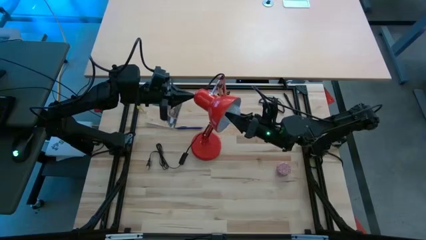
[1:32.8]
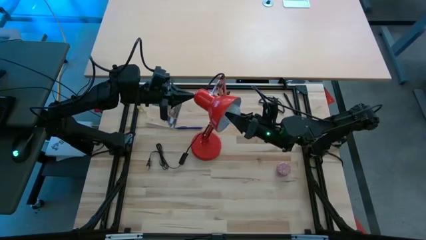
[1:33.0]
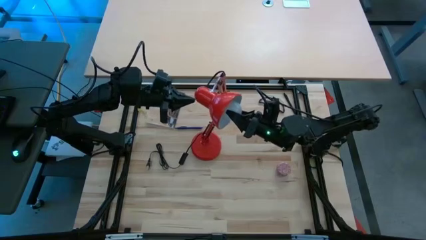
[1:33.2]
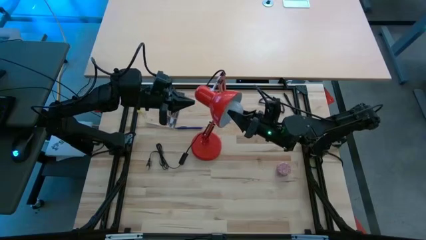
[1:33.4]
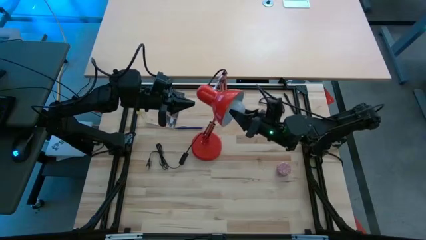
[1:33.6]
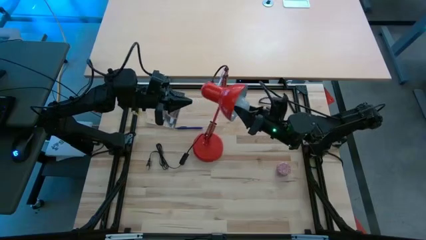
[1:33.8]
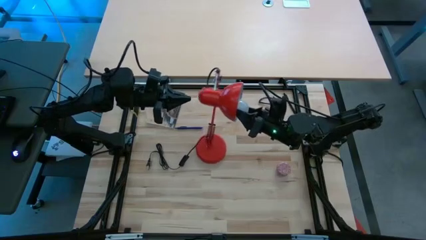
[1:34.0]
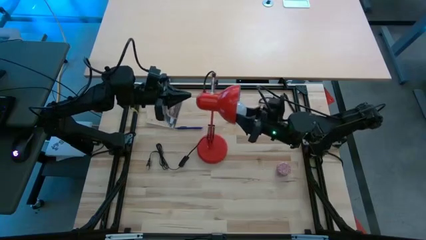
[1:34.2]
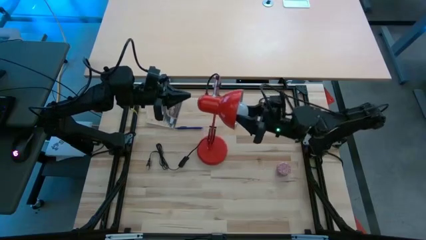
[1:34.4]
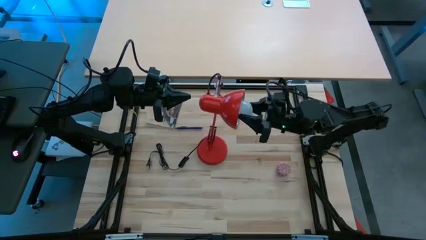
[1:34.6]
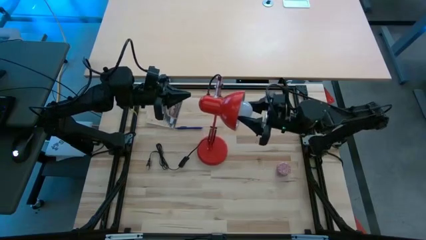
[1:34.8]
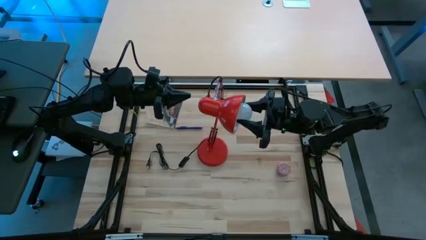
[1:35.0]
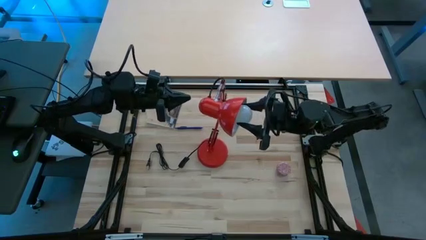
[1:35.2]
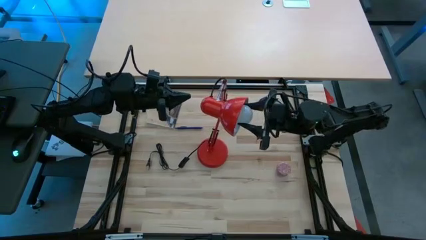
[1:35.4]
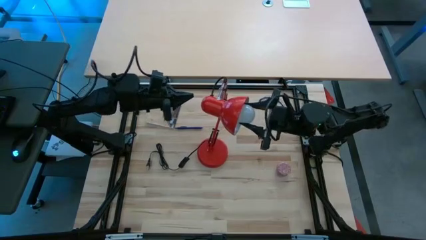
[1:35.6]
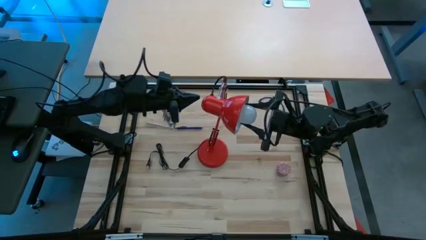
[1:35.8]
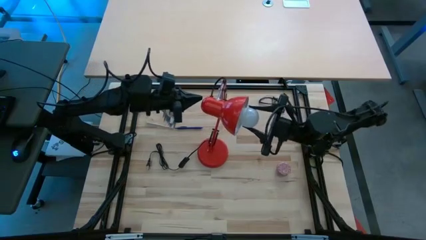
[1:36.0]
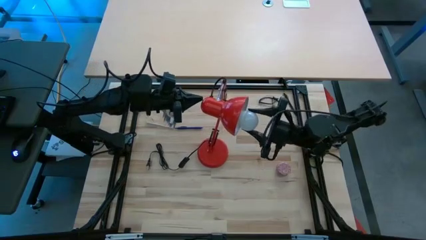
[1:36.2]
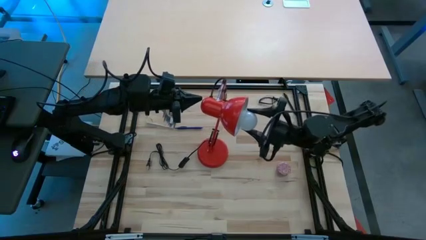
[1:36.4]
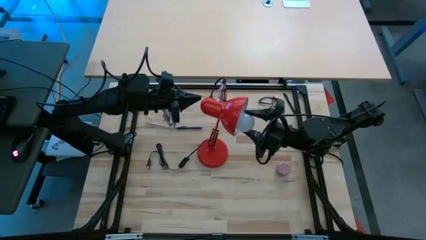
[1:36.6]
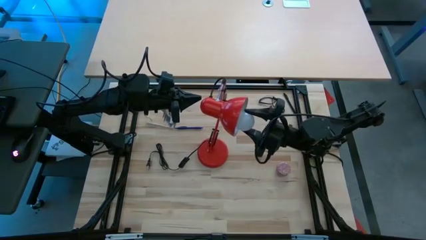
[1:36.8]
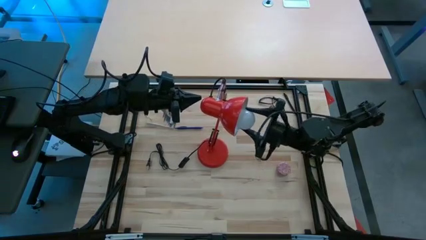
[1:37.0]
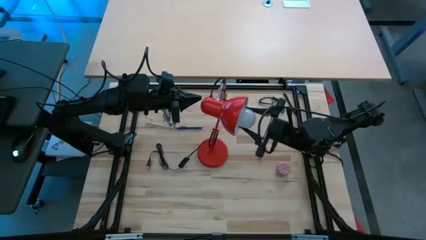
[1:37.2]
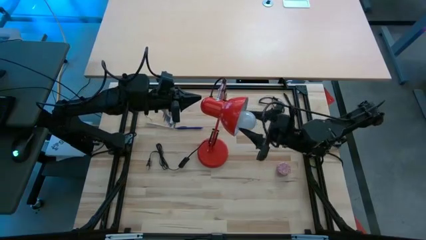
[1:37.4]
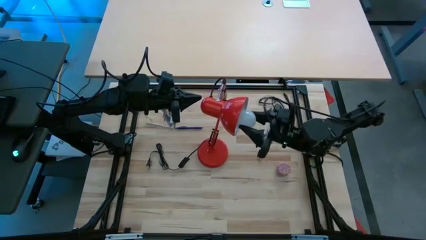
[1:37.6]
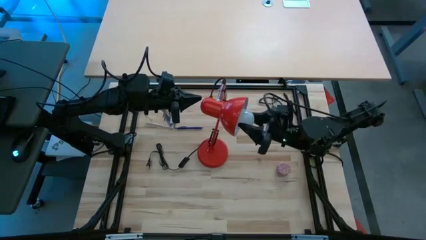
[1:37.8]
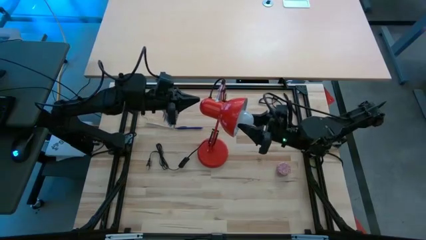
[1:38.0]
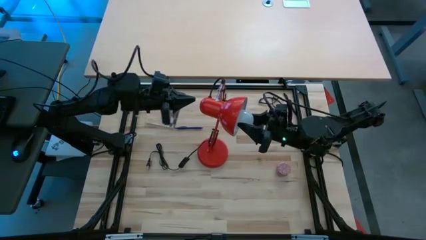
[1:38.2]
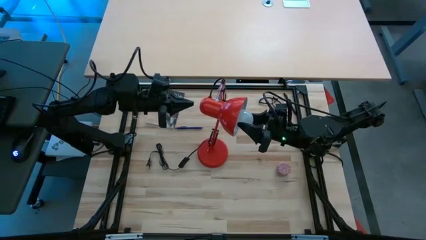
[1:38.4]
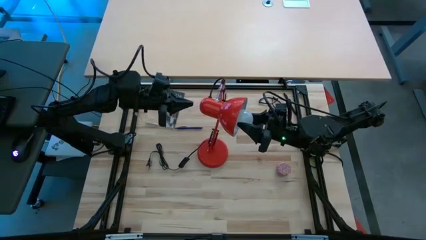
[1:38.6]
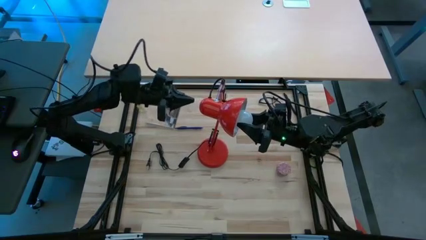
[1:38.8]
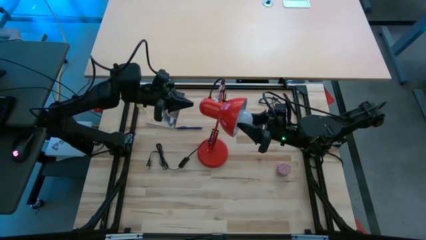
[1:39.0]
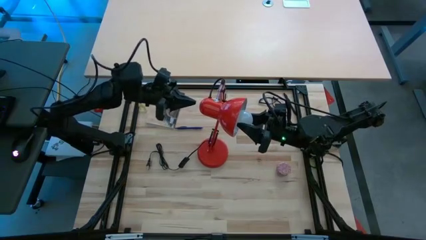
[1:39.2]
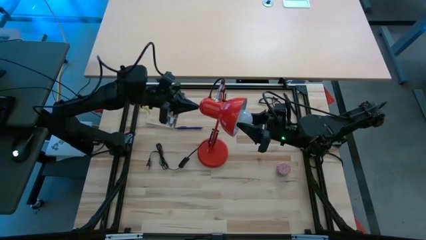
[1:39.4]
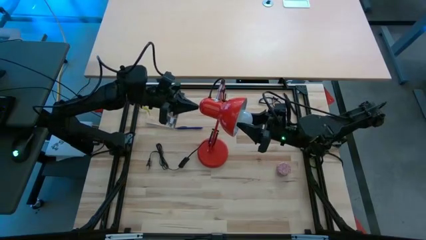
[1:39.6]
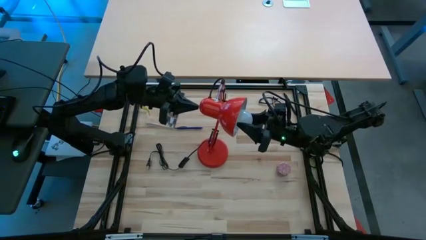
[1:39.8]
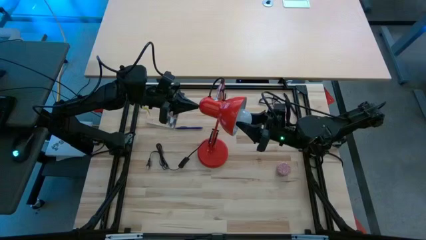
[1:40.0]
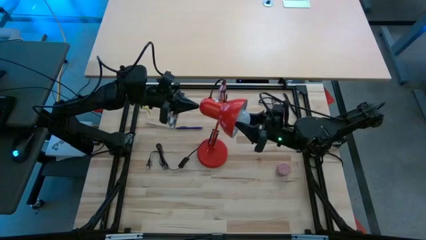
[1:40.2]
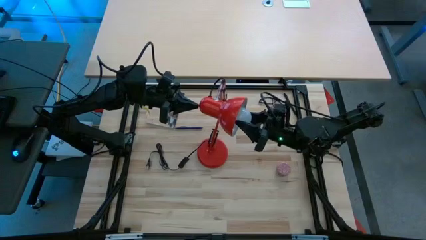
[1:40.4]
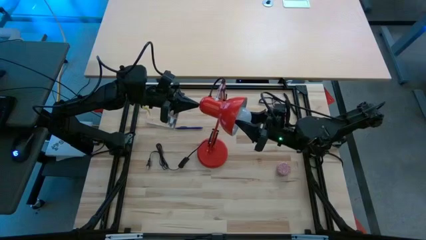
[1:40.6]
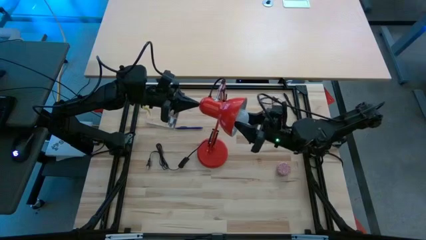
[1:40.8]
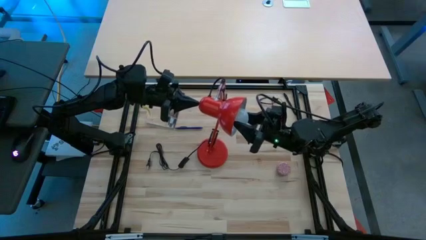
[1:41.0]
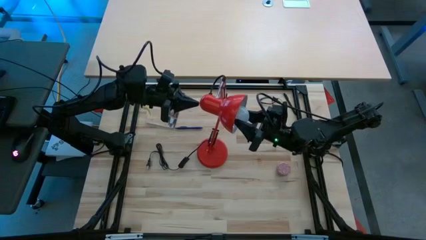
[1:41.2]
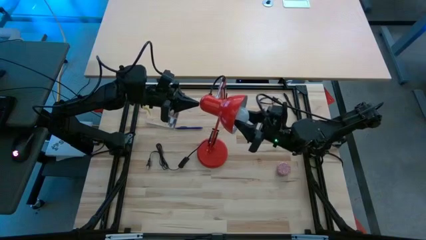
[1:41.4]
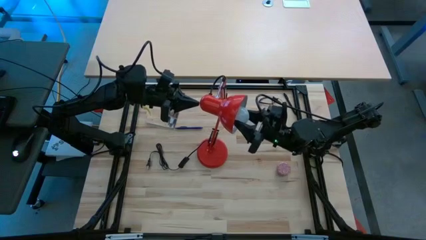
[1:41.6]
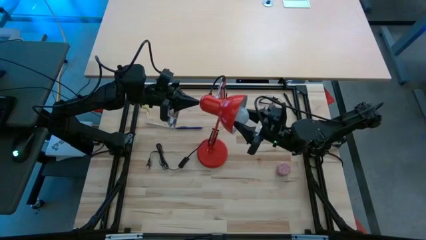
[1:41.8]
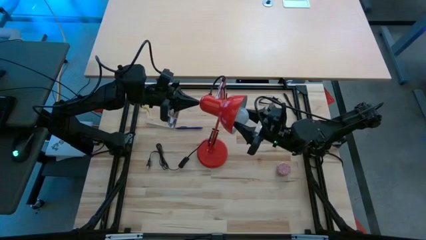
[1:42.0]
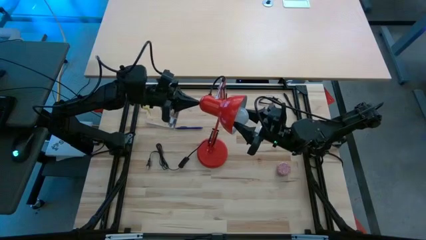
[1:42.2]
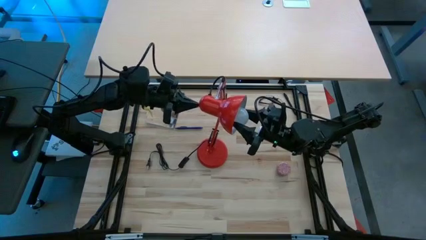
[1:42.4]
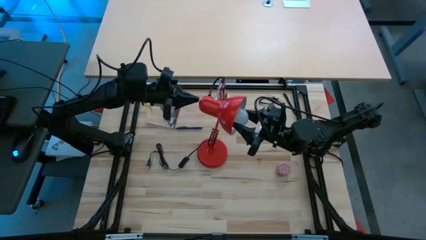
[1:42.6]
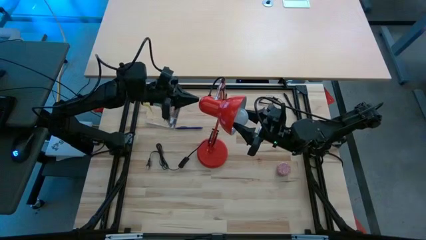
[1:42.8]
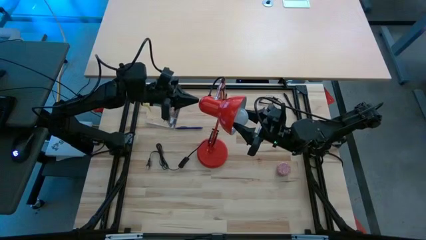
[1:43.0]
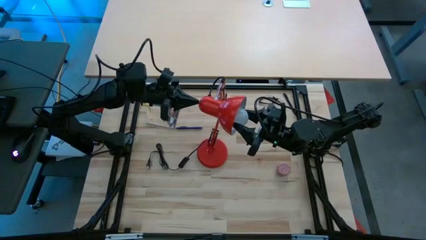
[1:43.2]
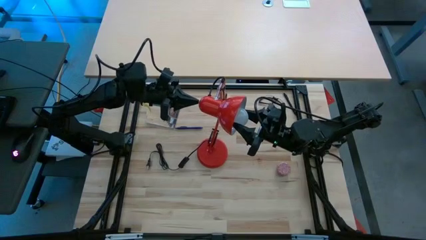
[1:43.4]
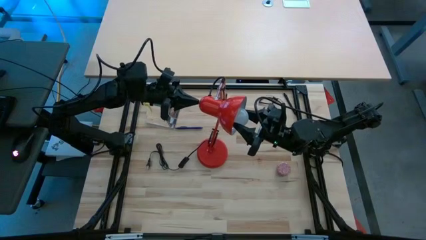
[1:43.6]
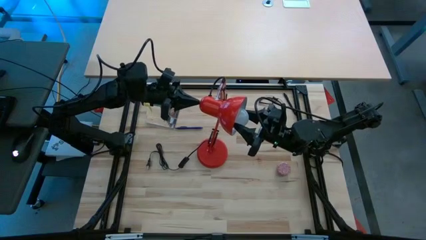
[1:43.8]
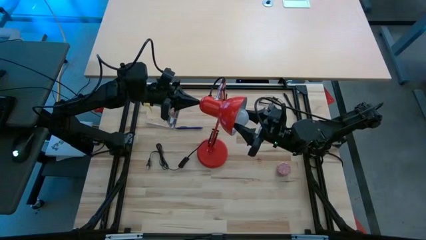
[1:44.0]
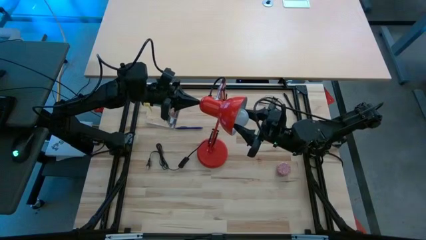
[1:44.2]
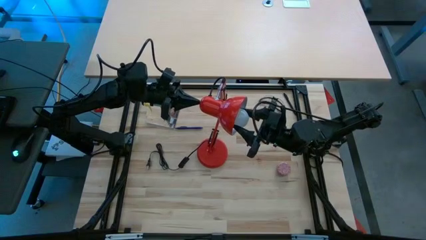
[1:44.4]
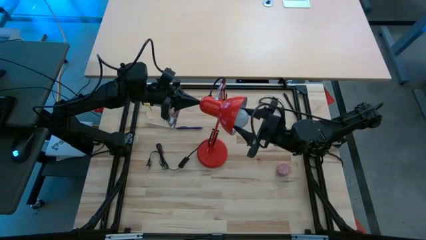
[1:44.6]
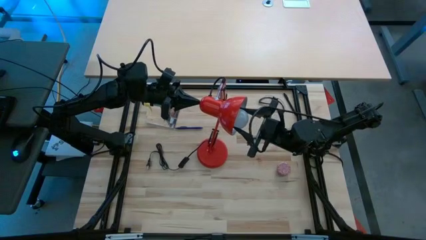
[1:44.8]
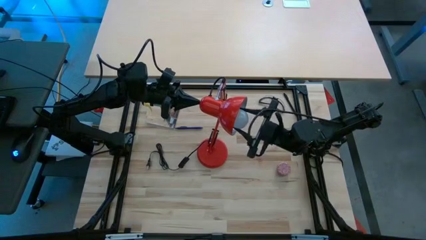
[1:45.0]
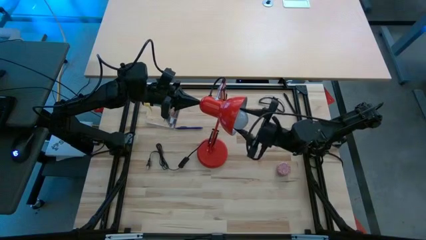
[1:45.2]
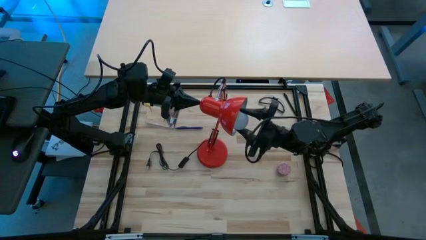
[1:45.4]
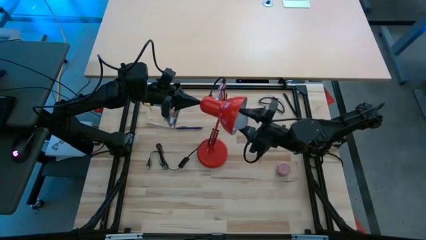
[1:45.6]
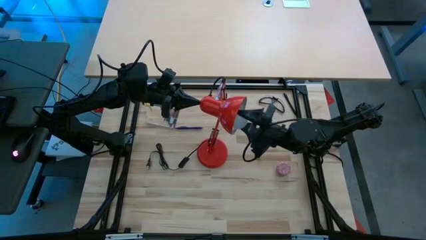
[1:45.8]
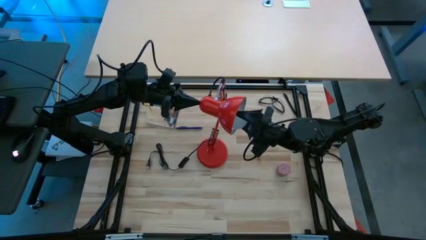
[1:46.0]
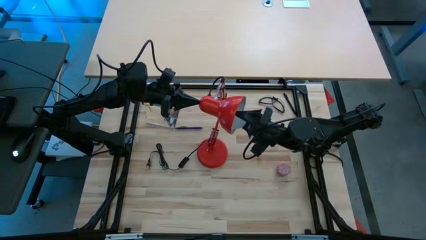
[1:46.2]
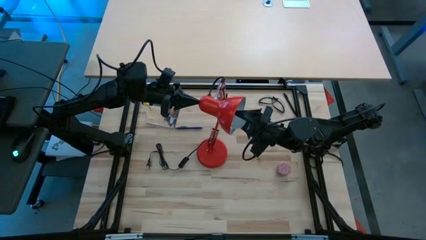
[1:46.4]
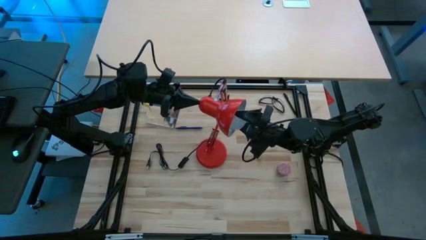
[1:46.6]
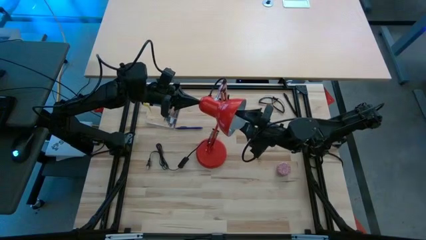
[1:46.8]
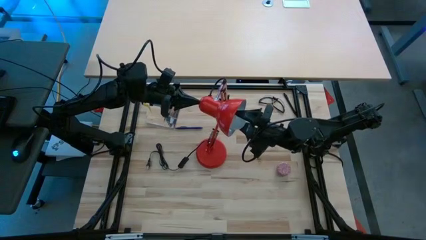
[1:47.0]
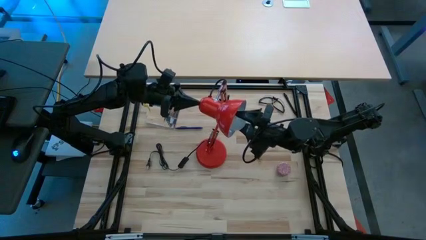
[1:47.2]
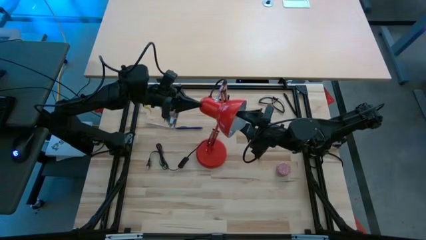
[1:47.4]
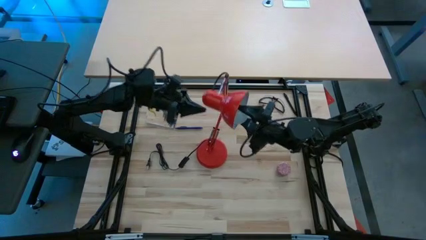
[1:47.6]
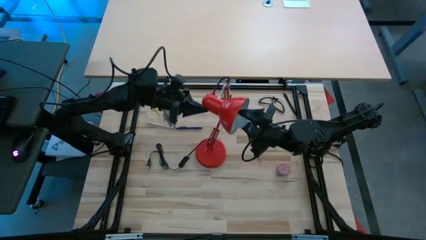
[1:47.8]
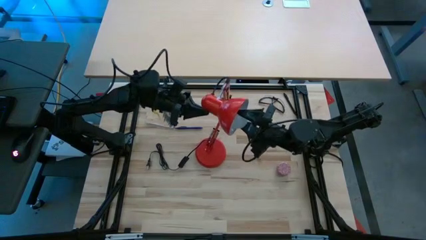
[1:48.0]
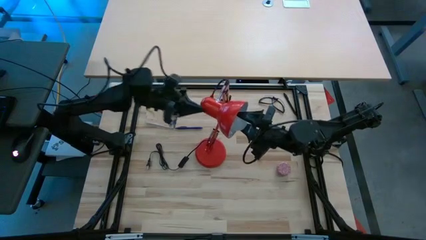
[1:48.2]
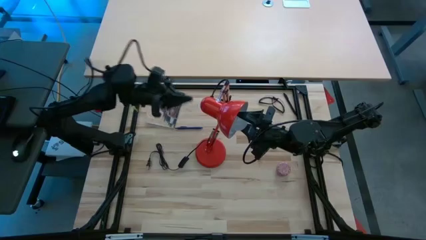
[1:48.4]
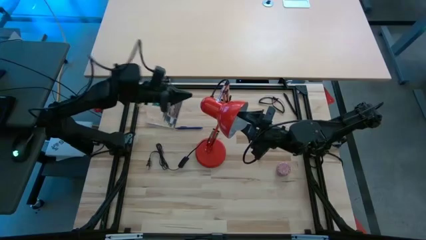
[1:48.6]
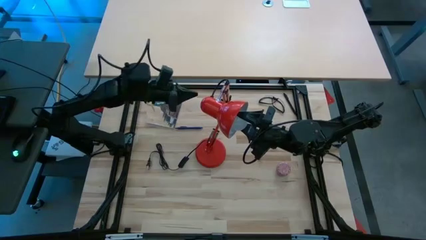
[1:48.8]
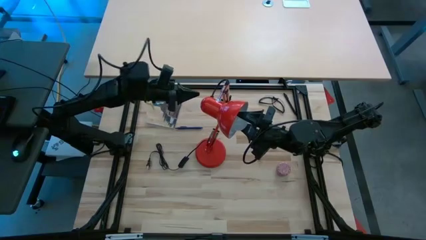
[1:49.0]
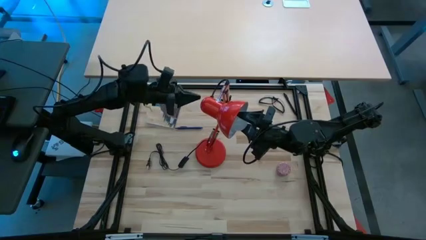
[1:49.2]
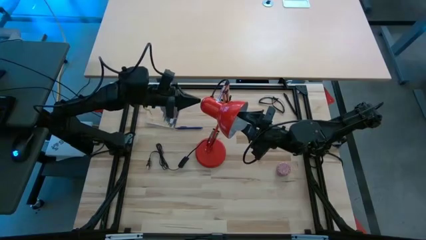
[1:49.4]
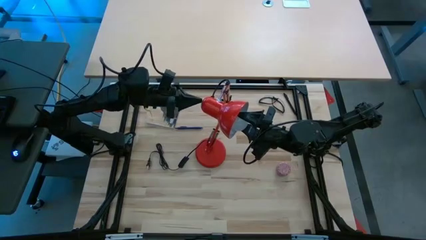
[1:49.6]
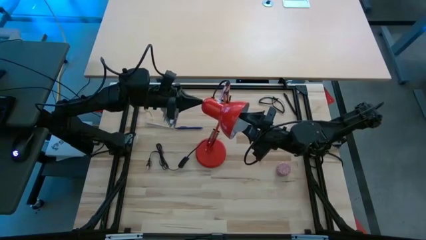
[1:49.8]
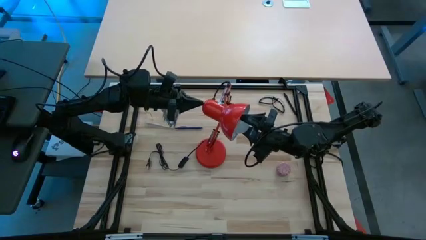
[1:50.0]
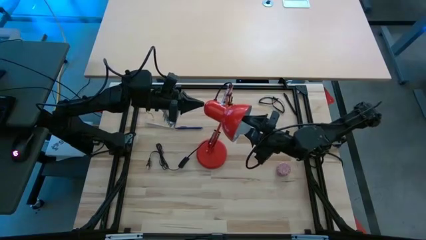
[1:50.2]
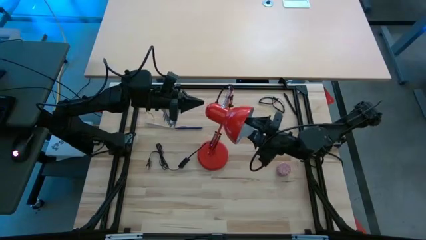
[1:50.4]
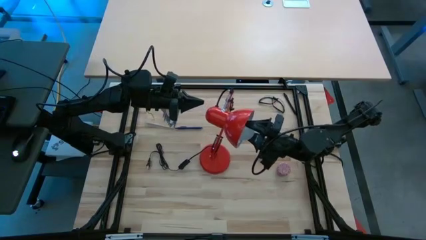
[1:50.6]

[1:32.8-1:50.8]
Task: Screw lightbulb
Insert the lightbulb on the lamp
